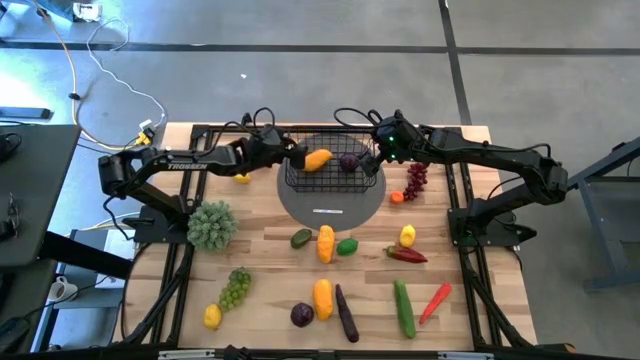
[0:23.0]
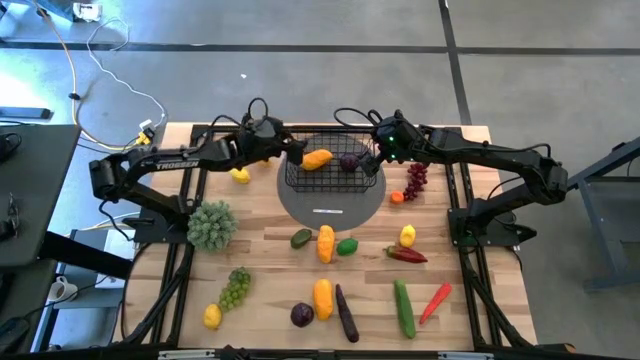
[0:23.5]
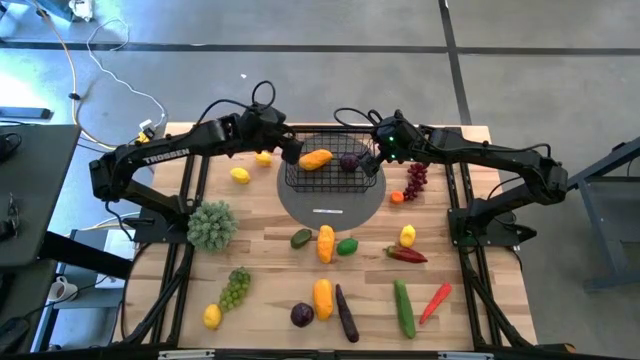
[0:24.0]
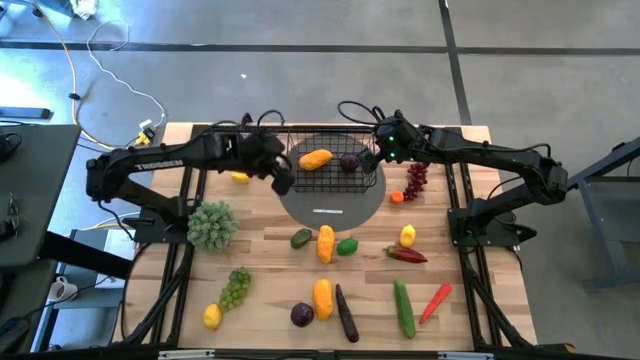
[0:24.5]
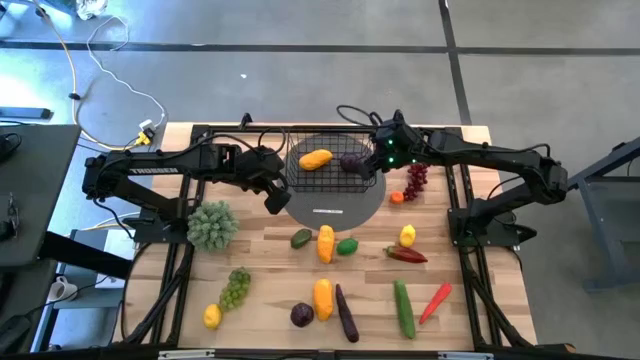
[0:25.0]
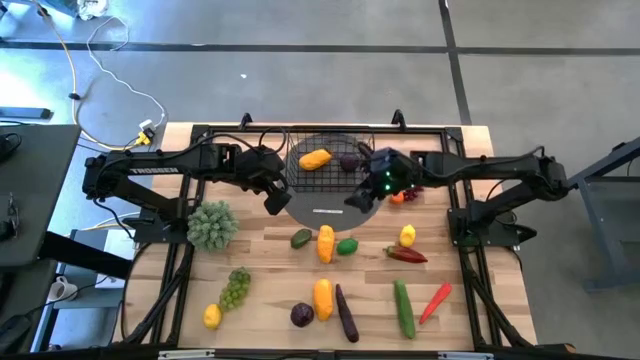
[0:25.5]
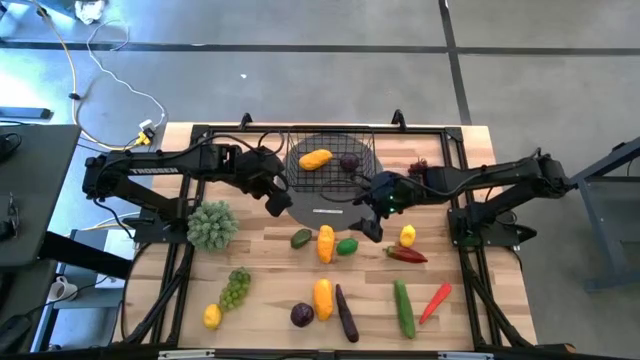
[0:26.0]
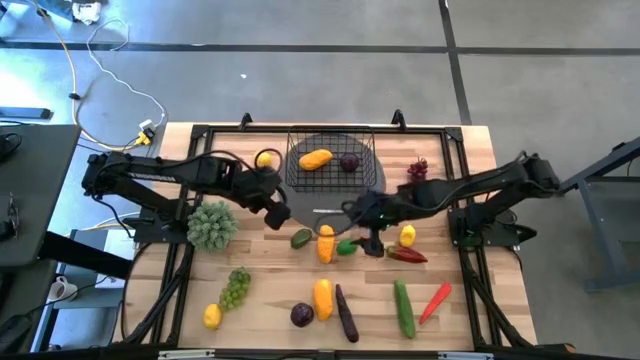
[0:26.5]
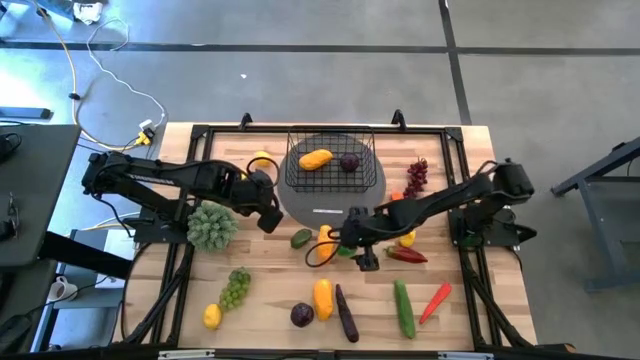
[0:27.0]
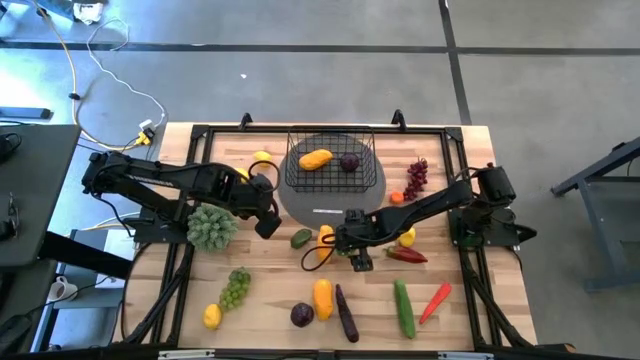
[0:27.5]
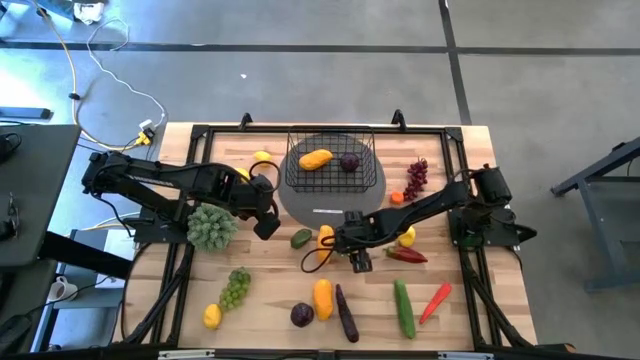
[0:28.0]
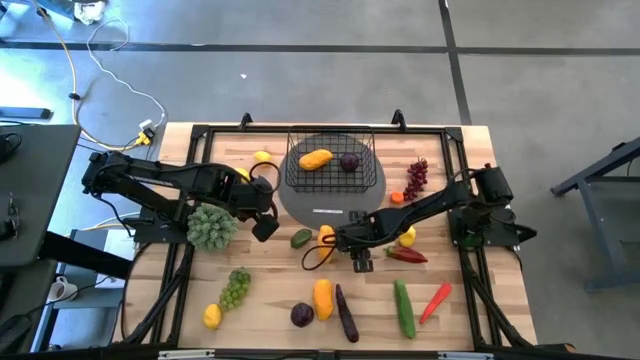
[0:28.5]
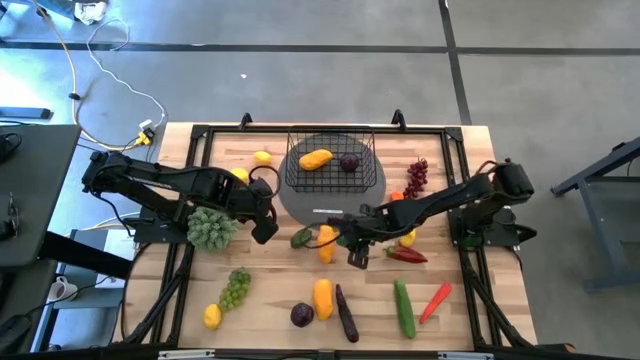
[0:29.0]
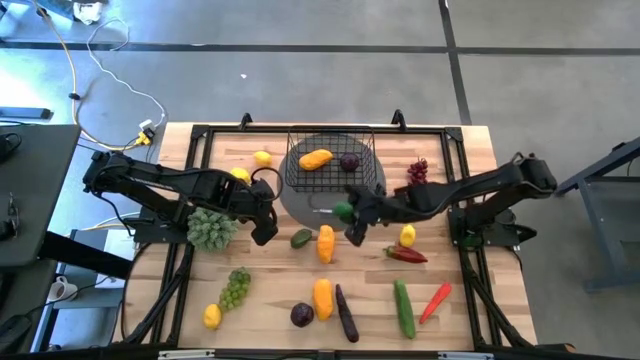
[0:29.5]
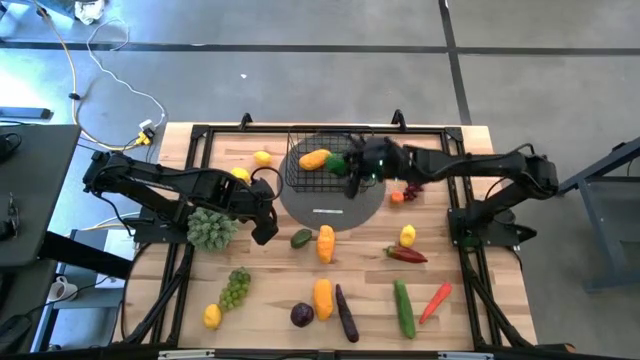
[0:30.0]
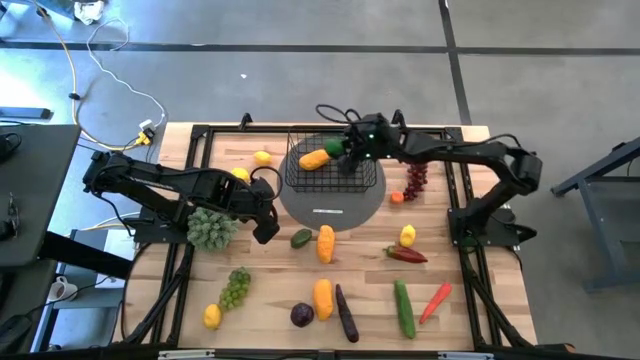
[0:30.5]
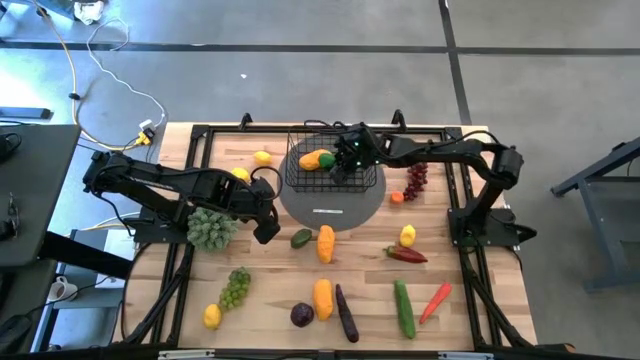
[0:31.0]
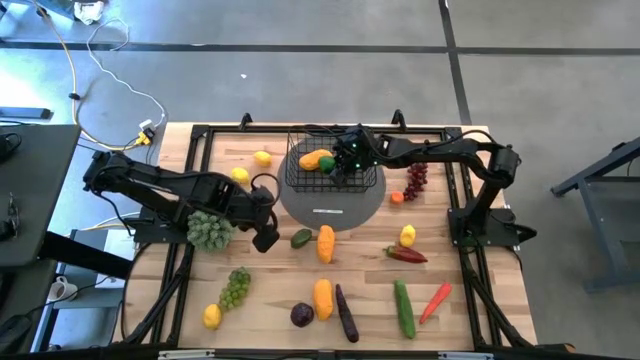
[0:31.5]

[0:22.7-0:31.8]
Task: Build produce basket
Put the green lime into the wire basket

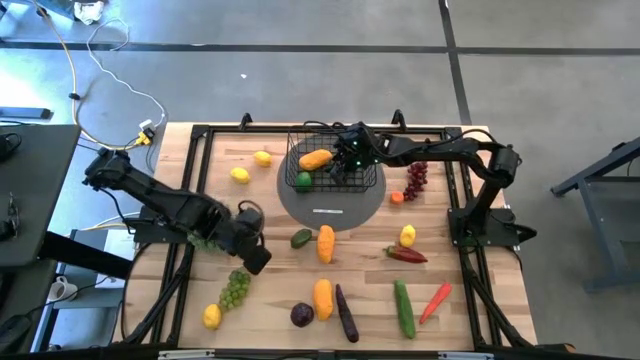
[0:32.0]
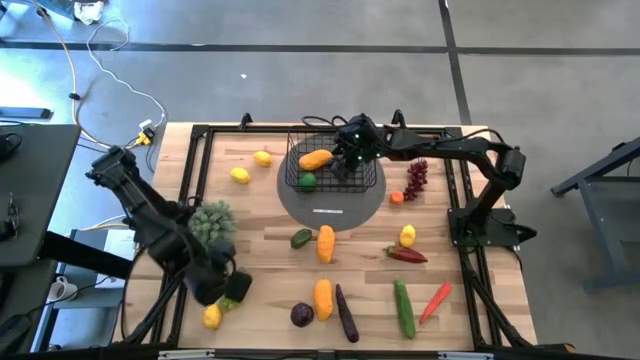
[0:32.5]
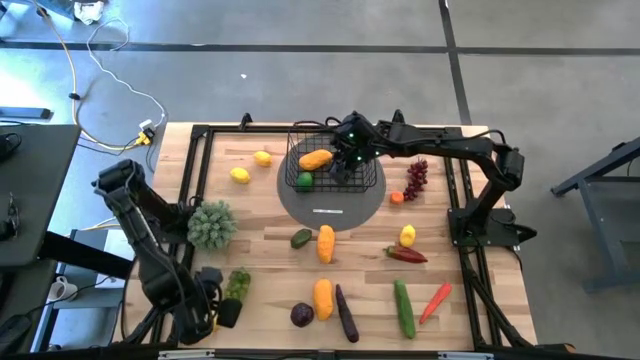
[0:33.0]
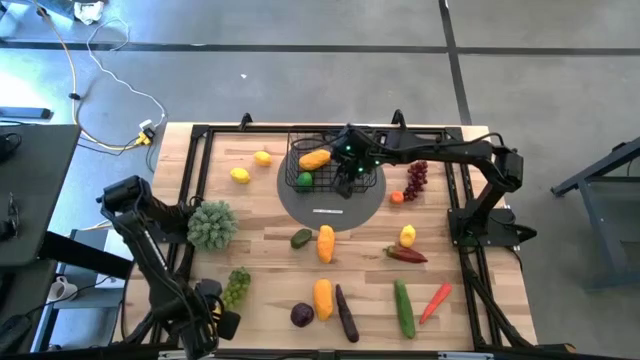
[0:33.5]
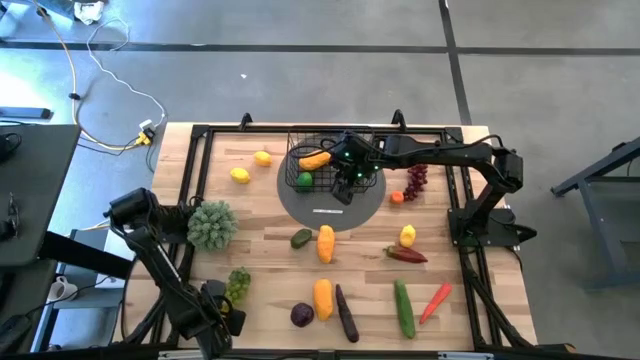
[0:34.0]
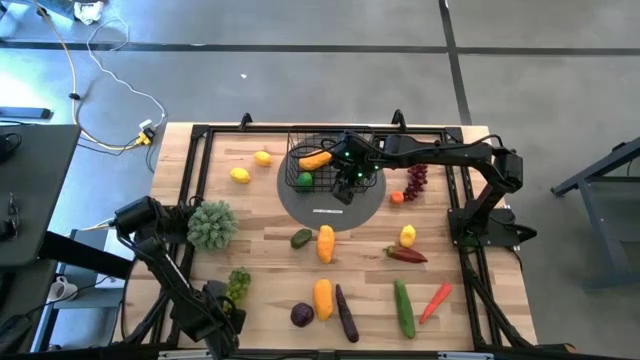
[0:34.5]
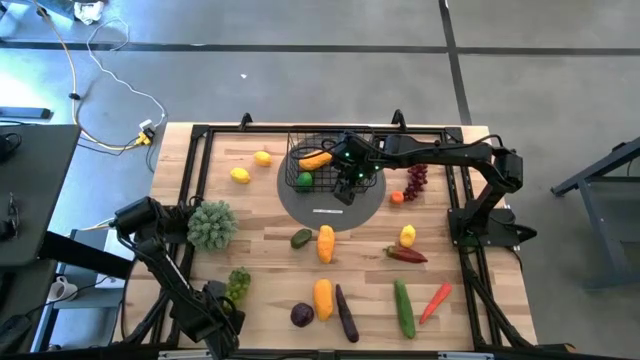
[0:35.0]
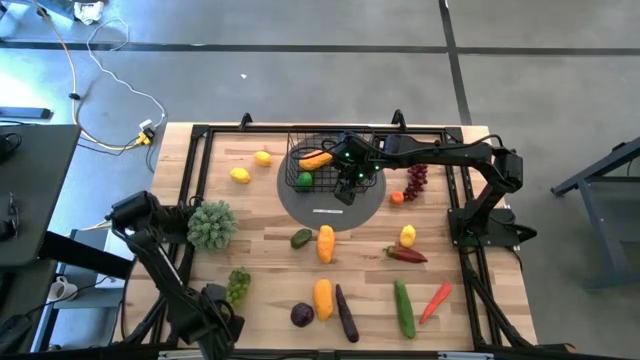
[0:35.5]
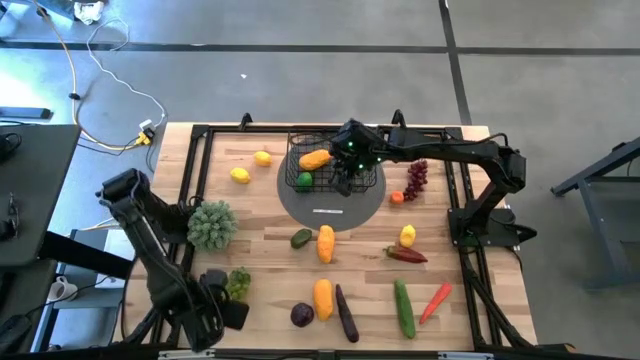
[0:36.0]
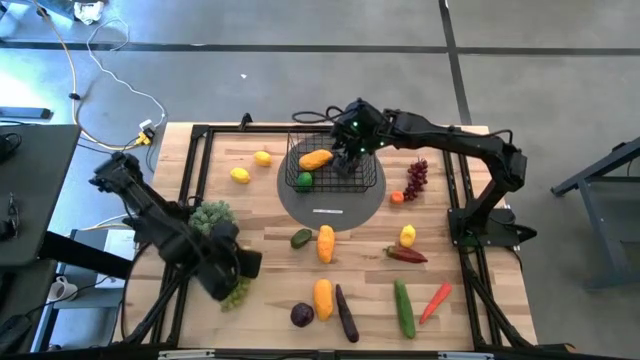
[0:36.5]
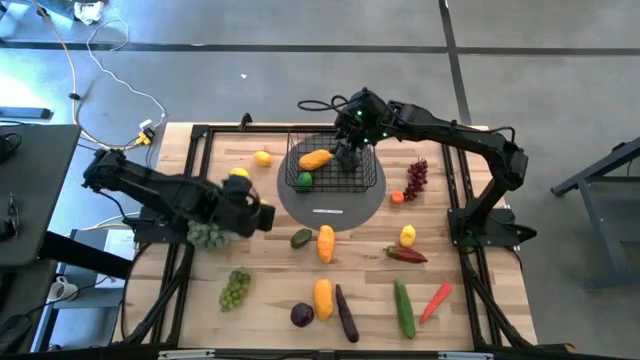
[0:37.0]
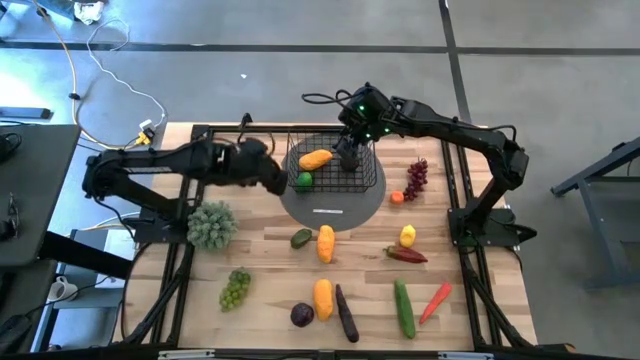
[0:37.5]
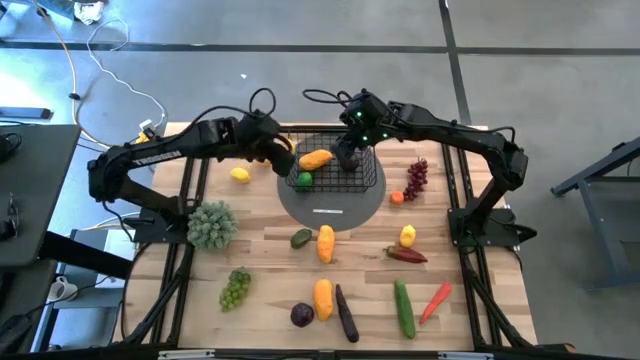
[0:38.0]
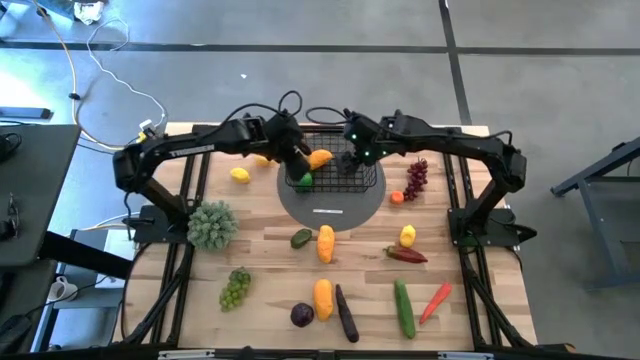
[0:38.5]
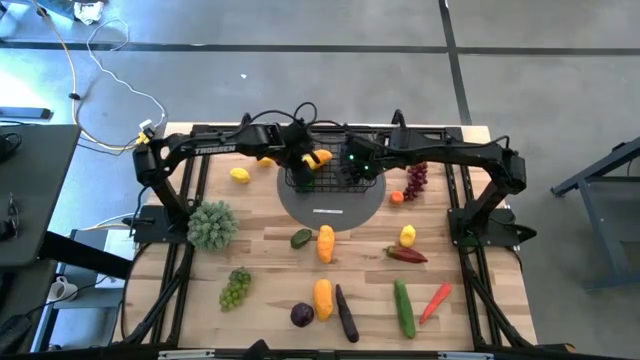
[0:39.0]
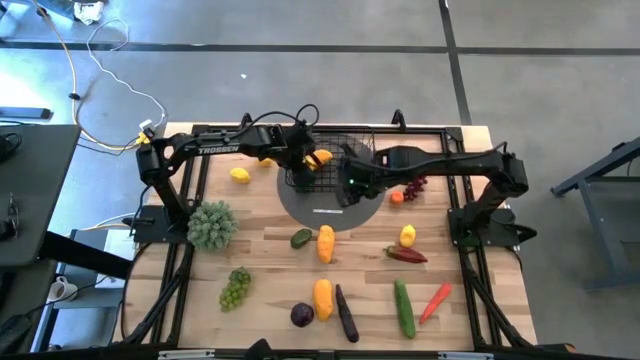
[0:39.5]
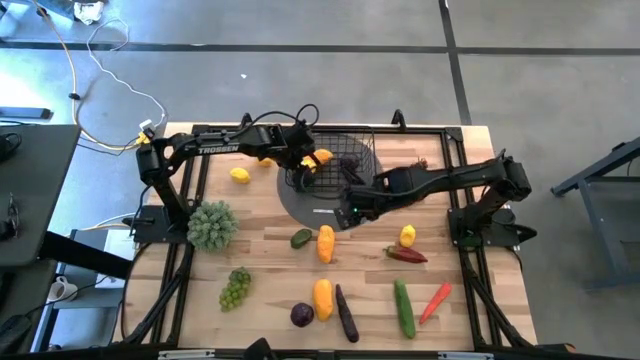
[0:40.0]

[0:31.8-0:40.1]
Put the yellow lemon into the wire basket

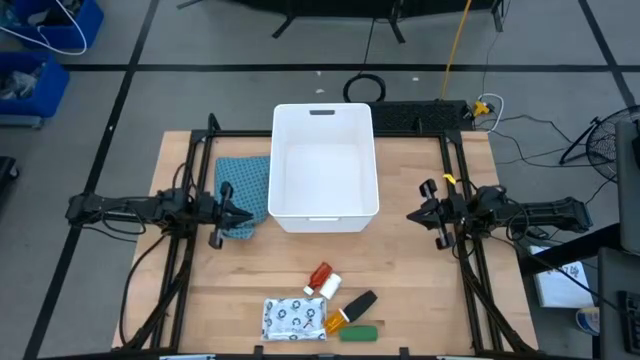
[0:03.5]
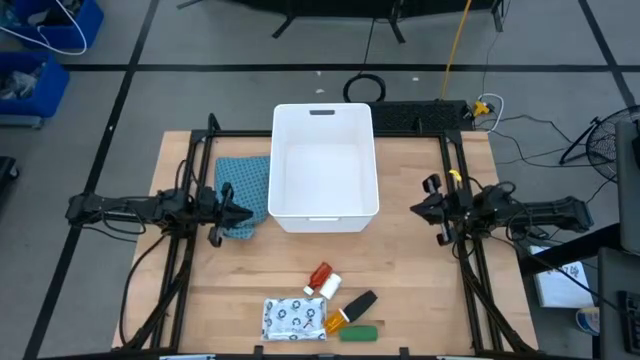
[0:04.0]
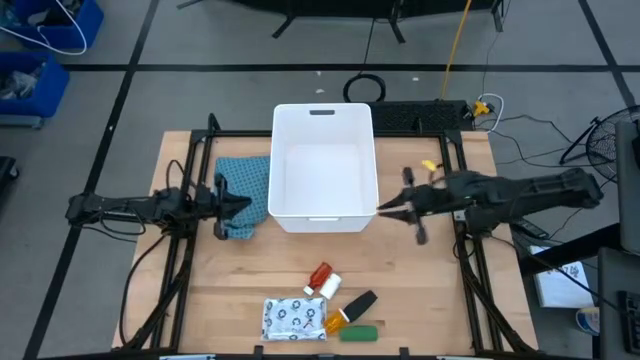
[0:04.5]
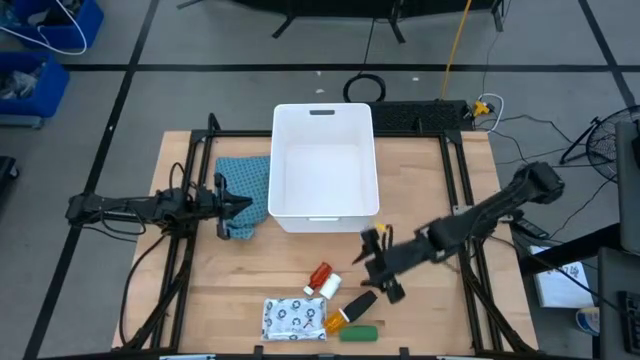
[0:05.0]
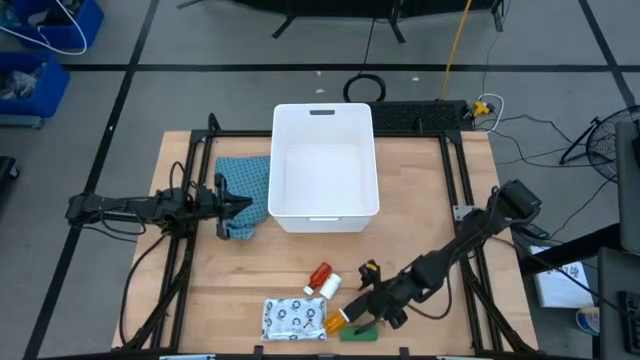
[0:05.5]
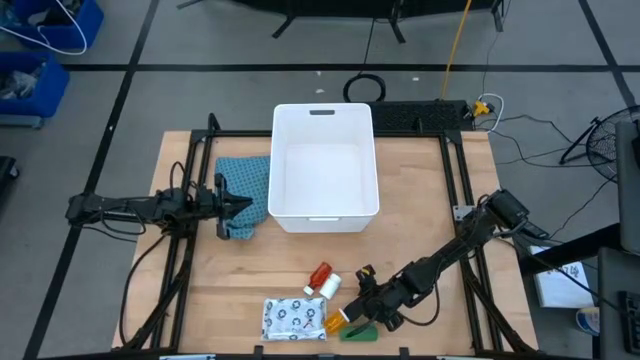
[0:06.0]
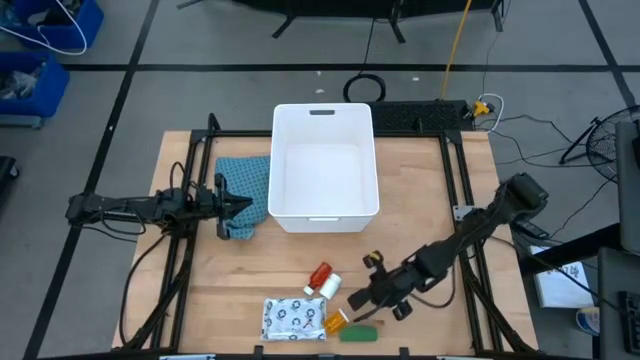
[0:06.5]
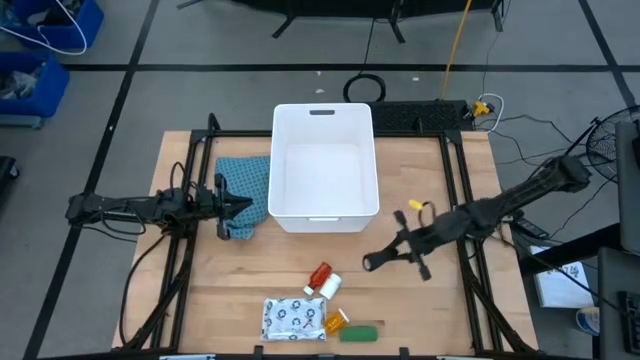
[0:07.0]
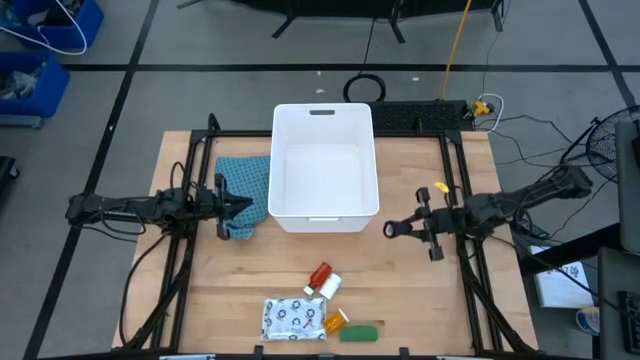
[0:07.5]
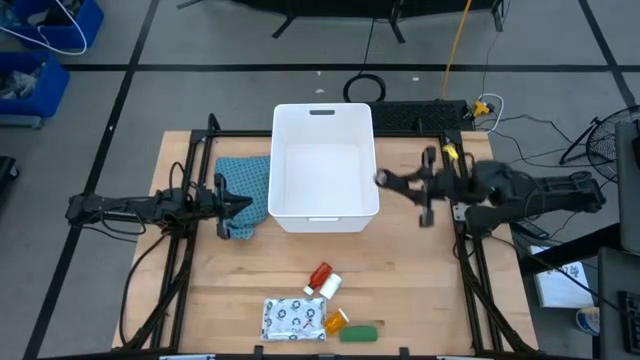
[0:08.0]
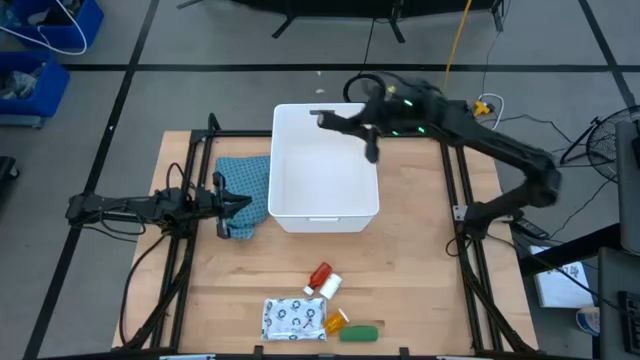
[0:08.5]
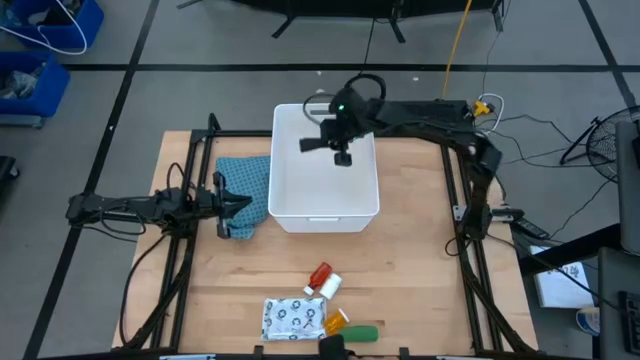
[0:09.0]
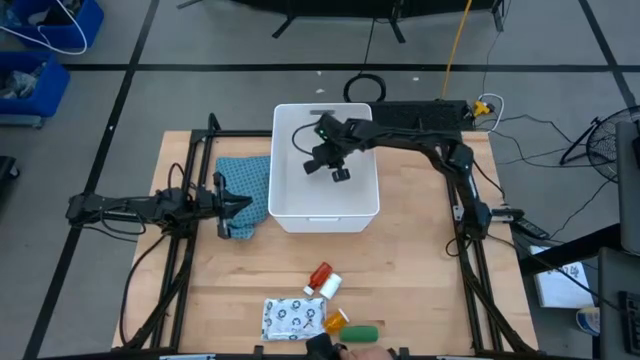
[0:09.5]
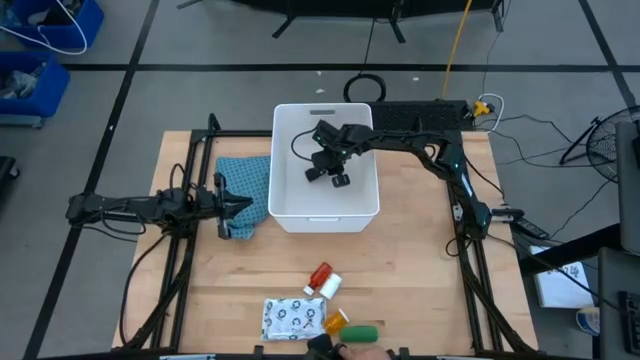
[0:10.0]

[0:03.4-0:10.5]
Task: Pick & place medical supplies in basket/bin
Put the black bandage into the white container
